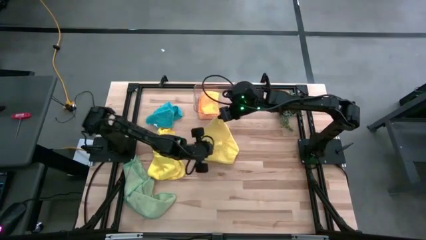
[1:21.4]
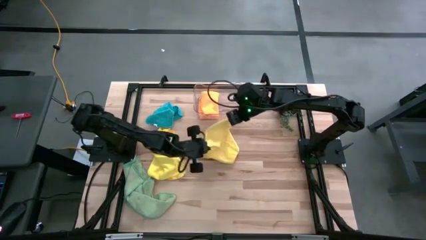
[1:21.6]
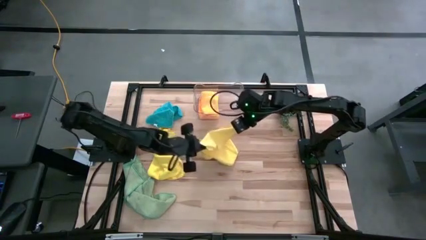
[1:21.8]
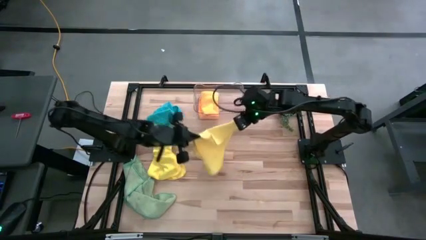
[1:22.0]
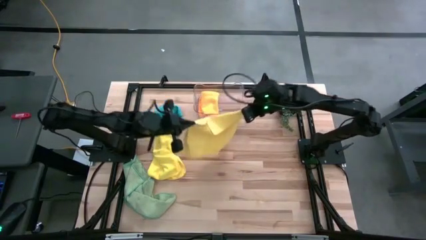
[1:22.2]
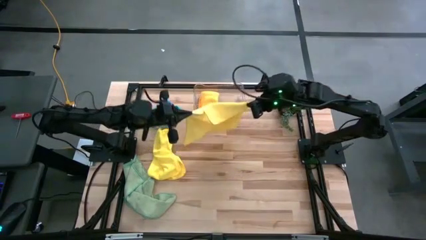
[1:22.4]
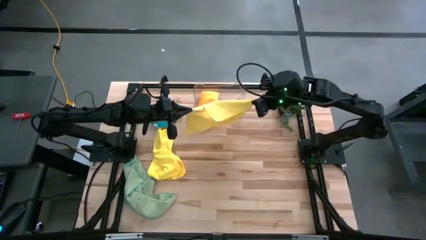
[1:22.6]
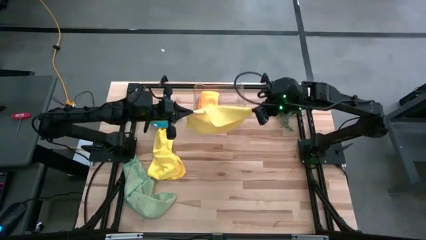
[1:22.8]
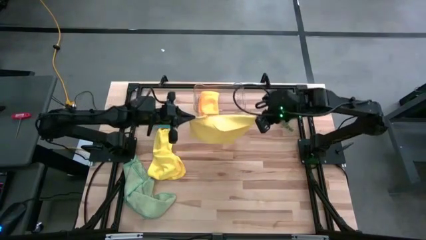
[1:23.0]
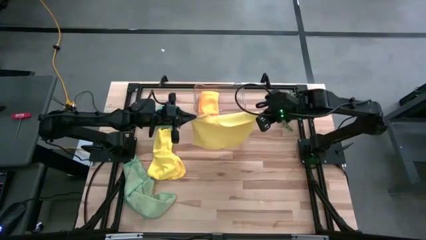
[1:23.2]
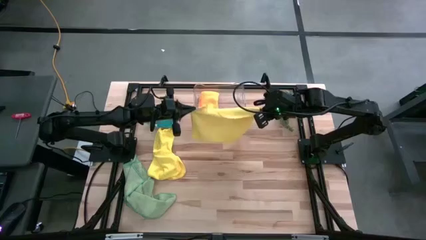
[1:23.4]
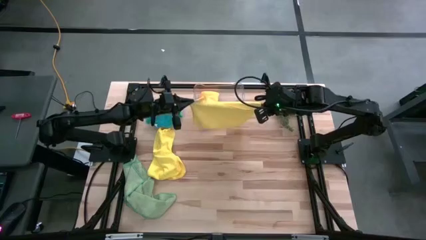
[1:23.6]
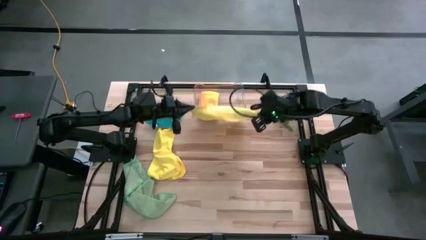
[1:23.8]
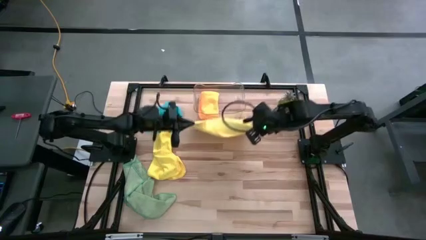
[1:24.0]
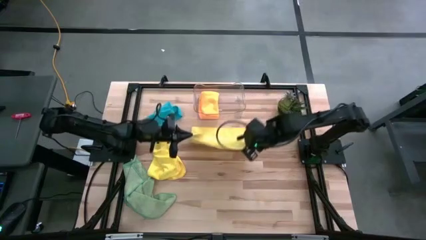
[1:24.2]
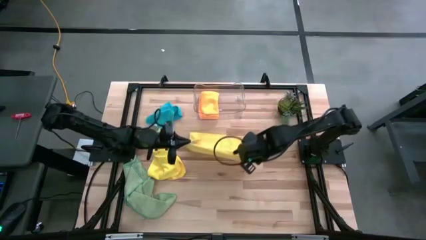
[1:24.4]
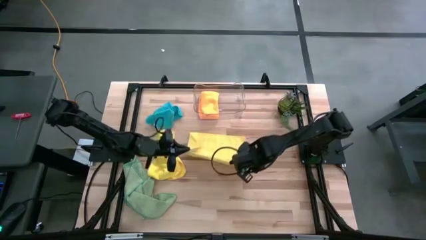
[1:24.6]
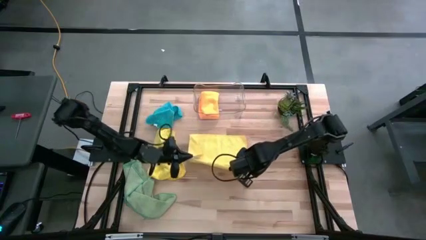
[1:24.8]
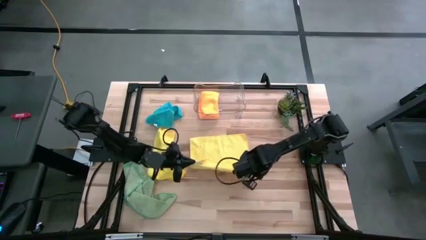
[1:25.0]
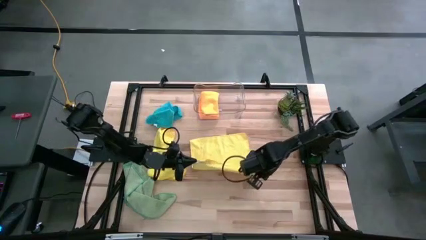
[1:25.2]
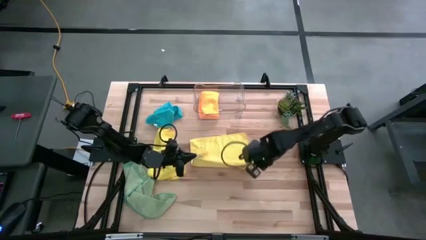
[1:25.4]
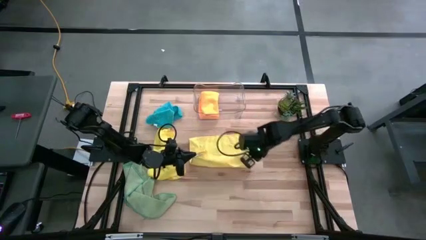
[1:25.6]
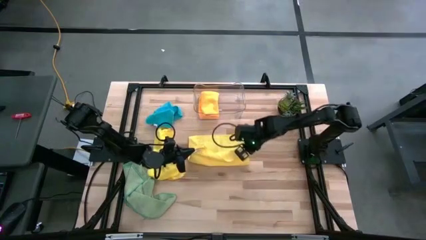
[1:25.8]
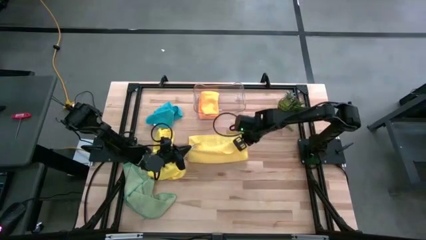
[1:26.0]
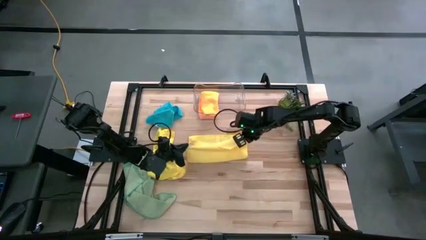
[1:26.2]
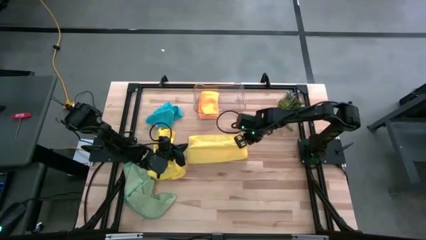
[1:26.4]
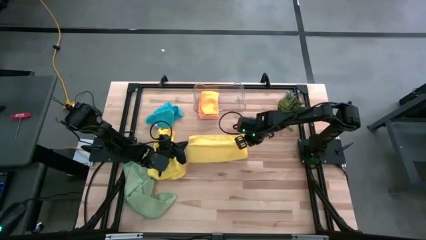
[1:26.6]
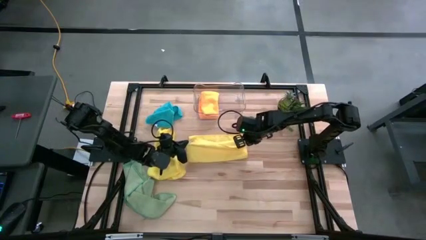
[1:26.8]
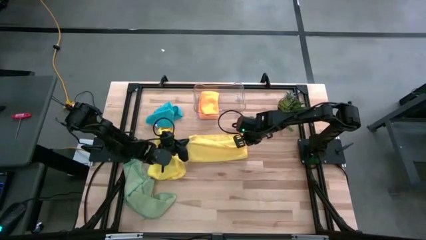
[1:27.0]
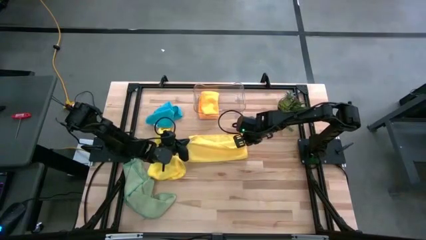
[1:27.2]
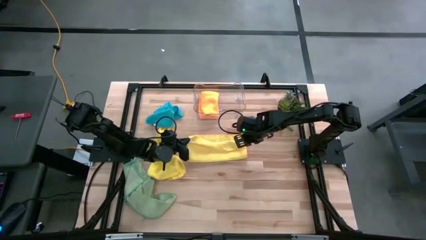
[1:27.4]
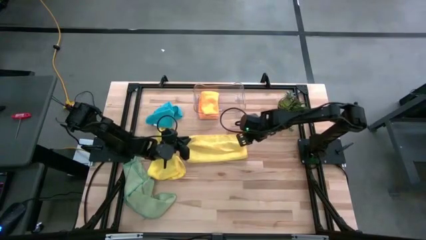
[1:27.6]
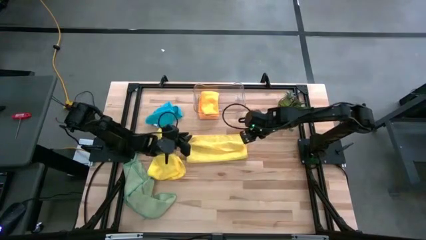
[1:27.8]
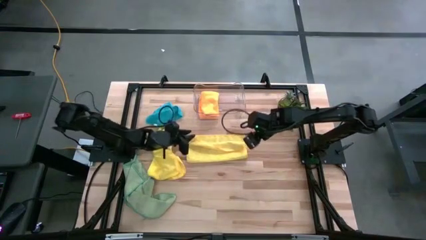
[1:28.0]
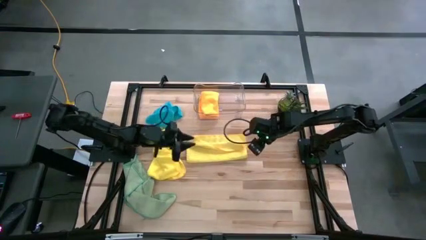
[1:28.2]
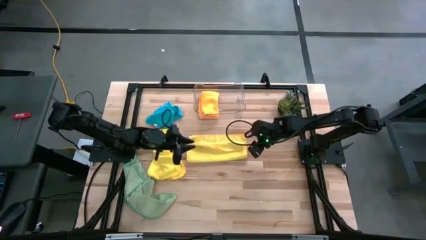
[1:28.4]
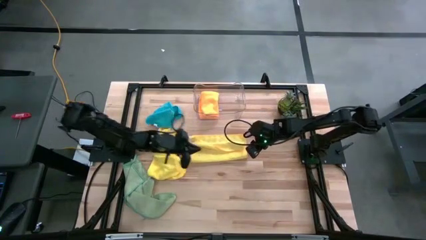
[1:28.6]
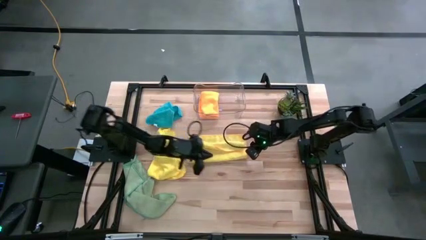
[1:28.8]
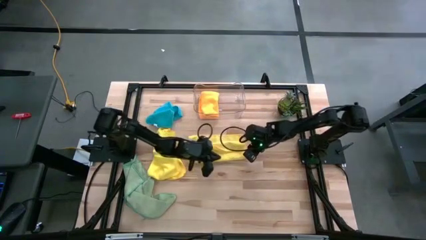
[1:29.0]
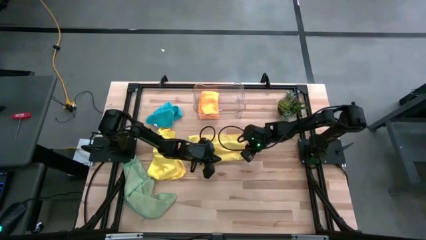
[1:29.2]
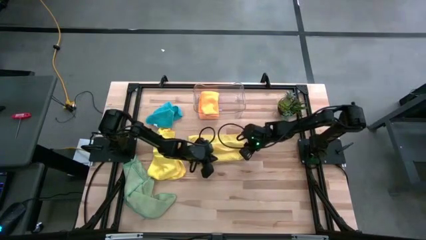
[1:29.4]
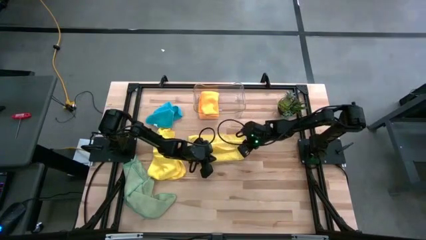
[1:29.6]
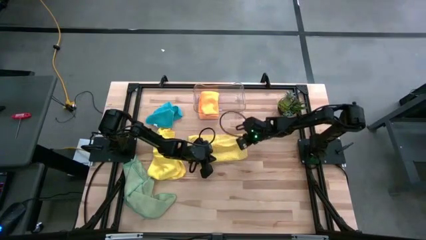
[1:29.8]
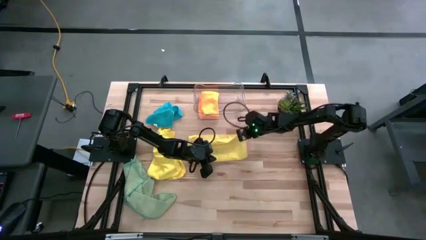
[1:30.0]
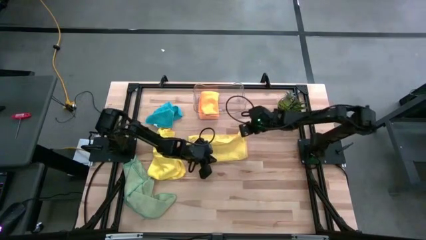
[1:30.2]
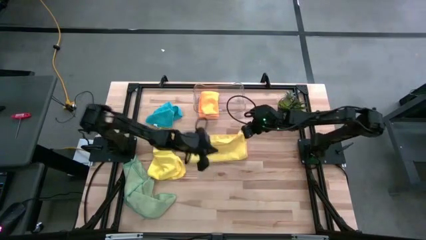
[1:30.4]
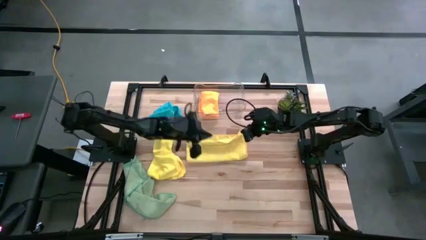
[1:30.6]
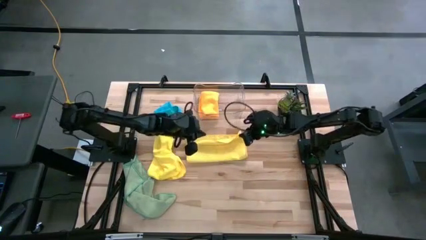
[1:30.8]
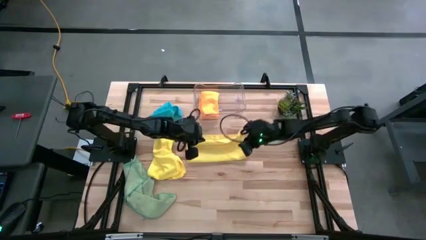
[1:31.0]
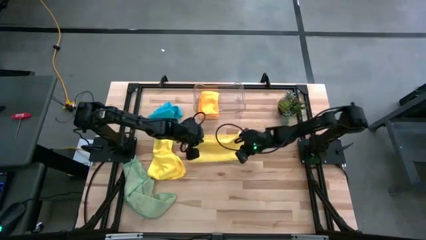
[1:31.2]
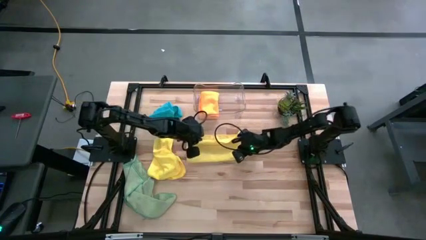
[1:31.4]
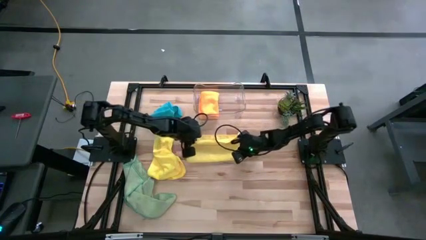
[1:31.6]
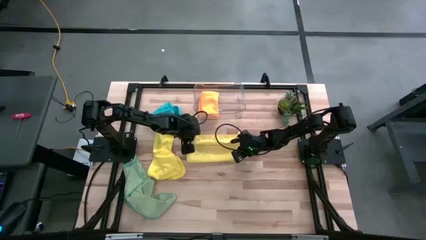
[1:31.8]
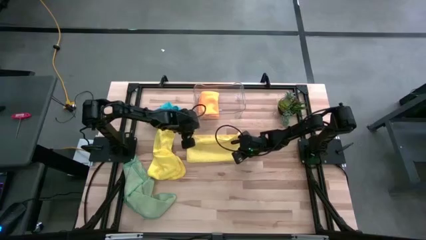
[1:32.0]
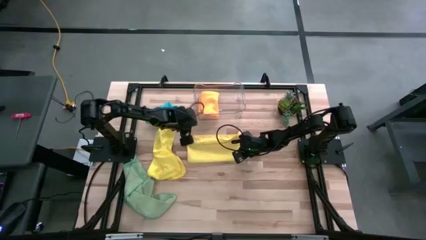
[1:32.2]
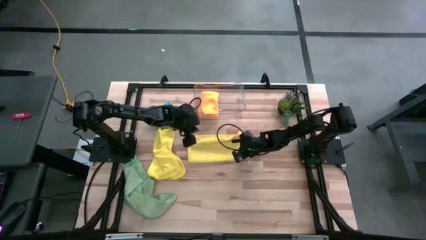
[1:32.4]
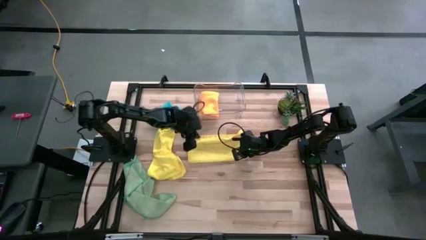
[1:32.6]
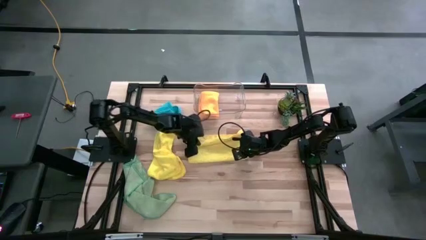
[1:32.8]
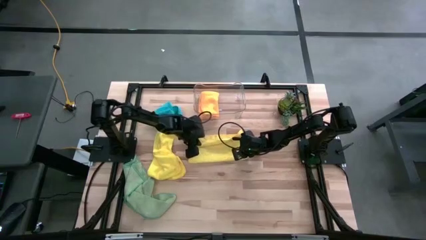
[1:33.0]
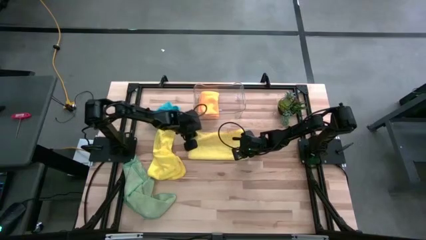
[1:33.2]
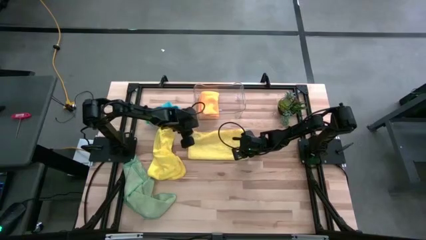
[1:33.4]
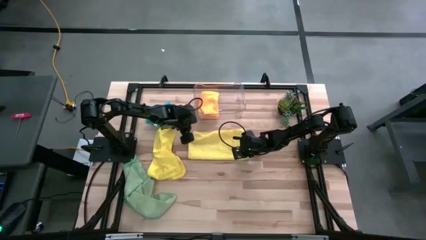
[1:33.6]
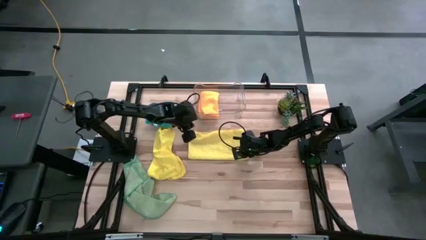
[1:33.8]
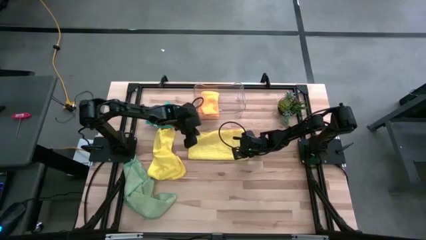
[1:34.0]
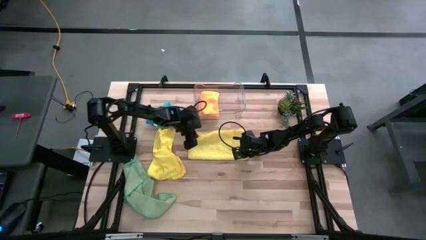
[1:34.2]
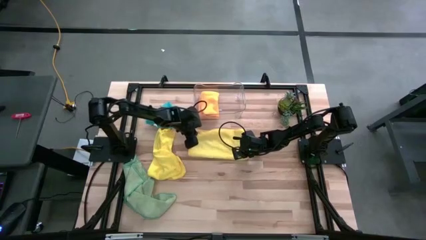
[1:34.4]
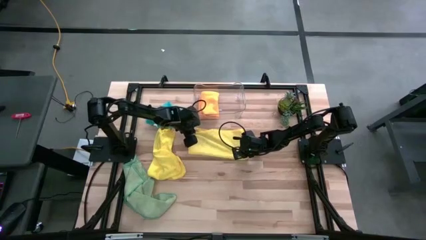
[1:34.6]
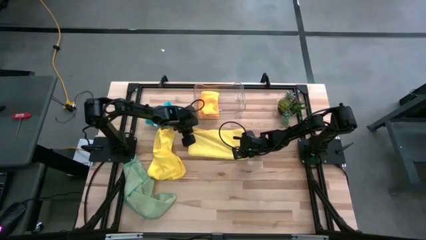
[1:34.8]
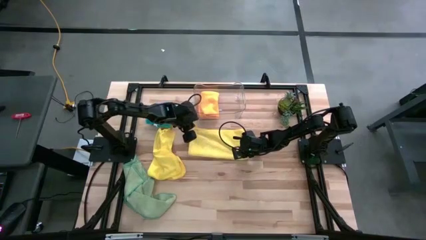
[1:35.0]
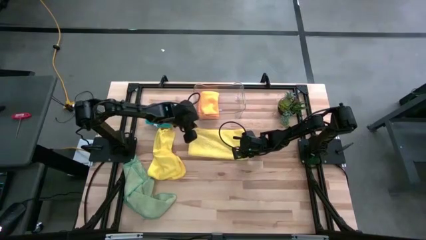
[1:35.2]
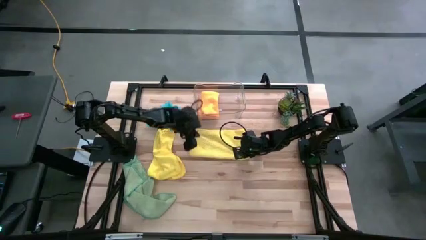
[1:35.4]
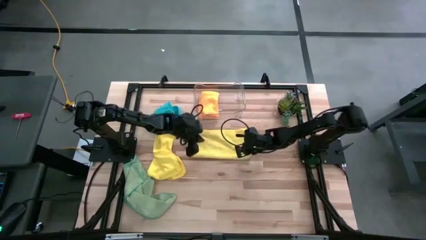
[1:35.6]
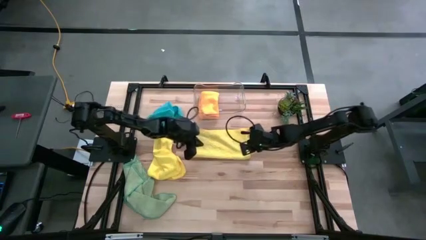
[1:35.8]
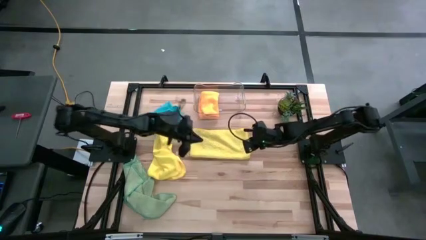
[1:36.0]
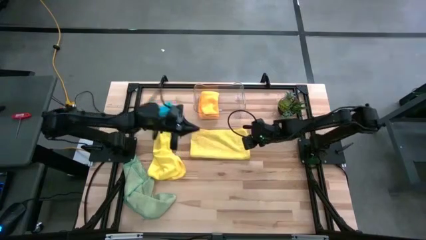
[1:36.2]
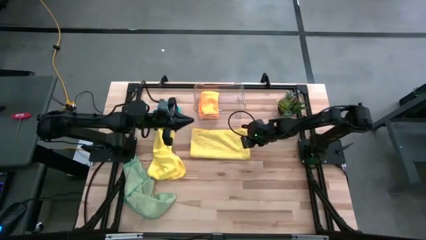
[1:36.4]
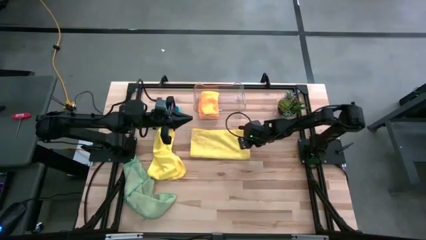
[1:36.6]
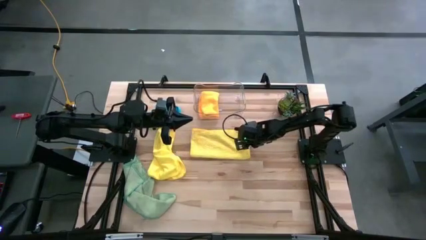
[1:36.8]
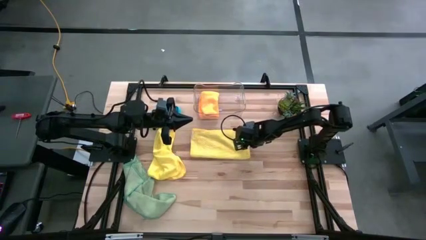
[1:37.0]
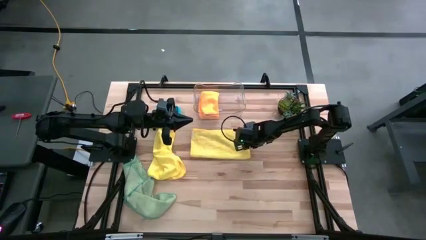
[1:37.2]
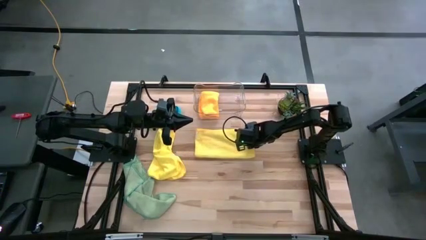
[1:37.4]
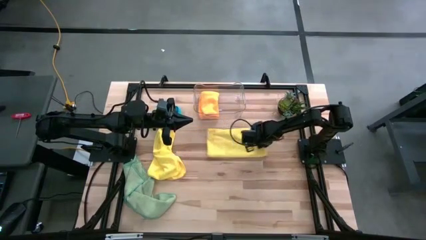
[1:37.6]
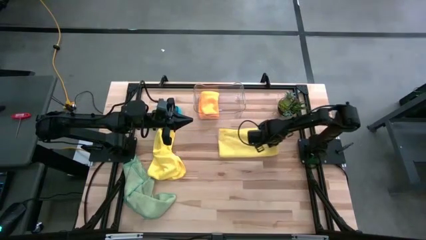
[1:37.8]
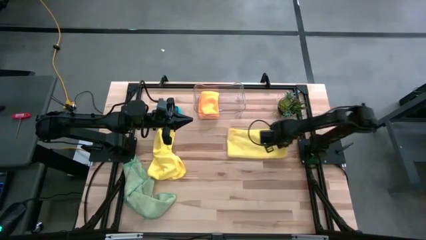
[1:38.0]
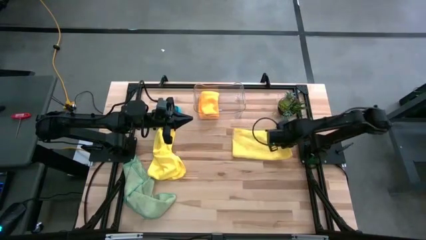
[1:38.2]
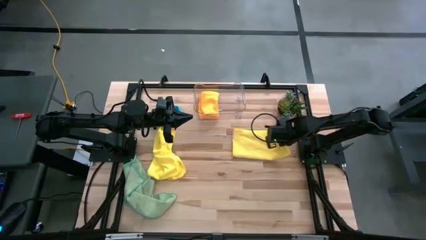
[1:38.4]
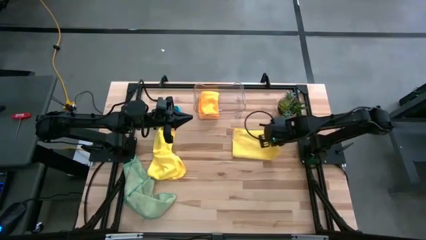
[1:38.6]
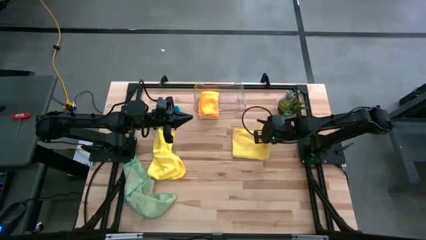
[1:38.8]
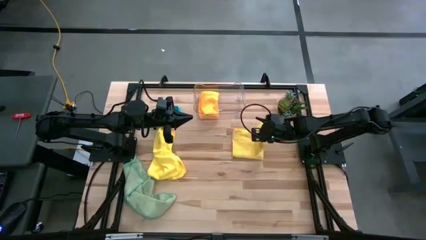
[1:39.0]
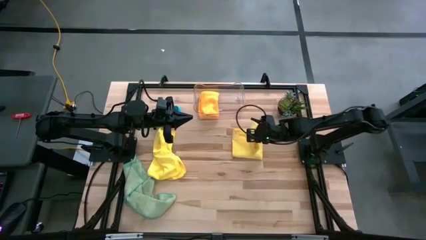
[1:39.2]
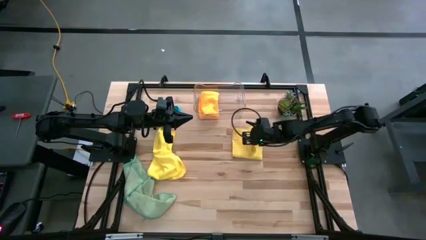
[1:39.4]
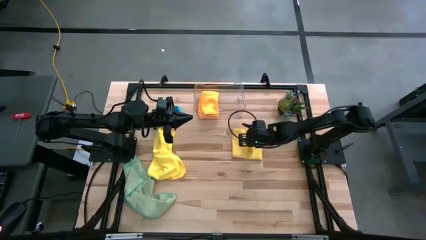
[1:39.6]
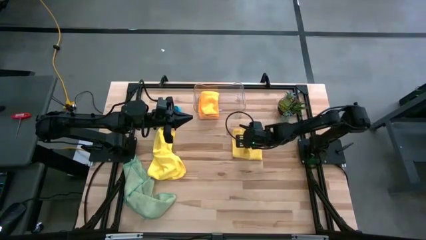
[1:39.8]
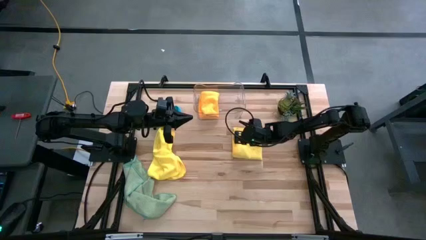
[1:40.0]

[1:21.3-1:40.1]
Task: Fold microfiber towels
Fold the right yellow microfiber towel
